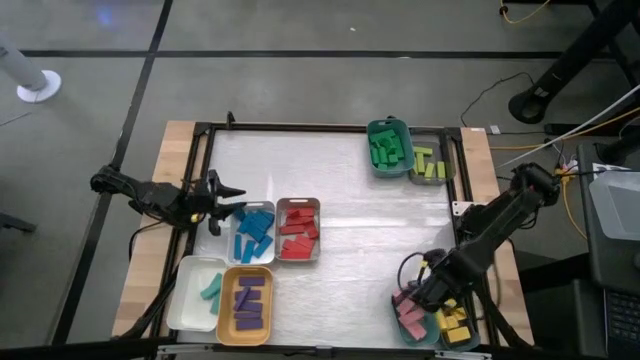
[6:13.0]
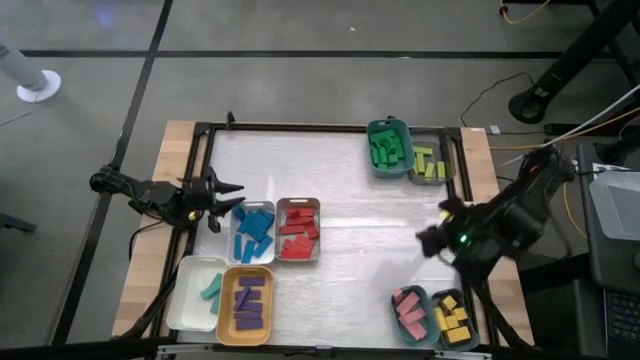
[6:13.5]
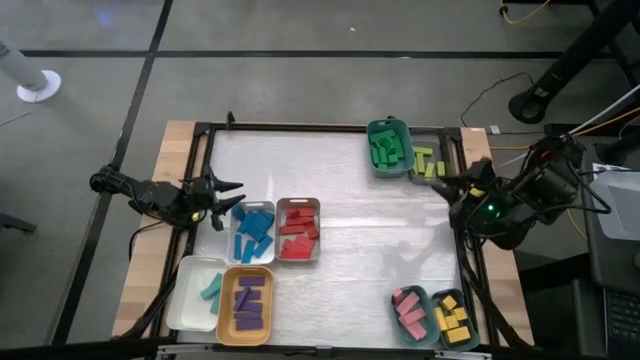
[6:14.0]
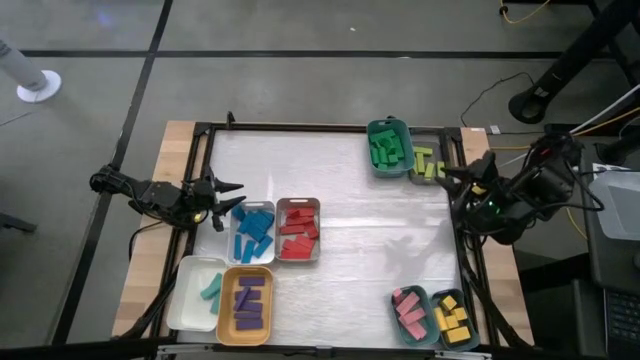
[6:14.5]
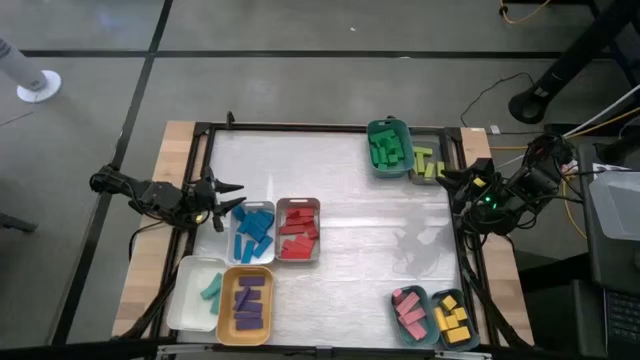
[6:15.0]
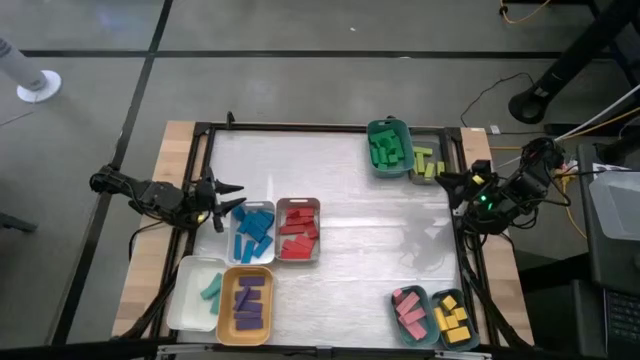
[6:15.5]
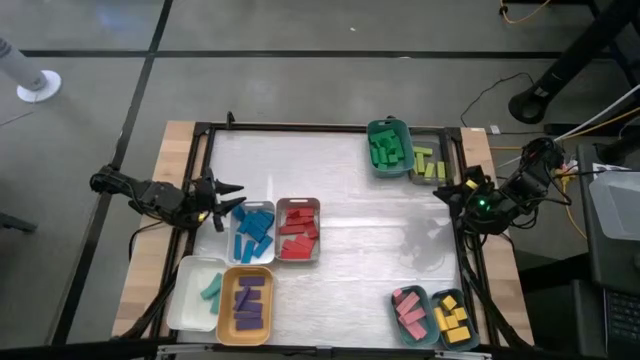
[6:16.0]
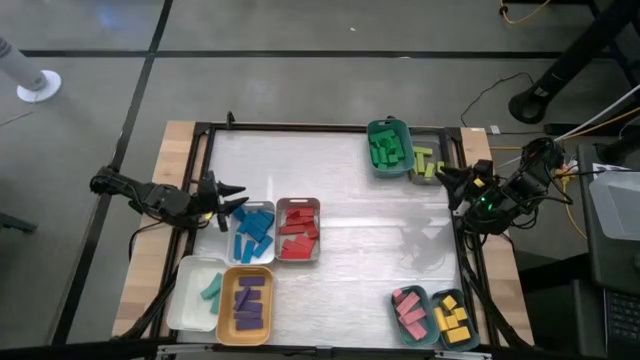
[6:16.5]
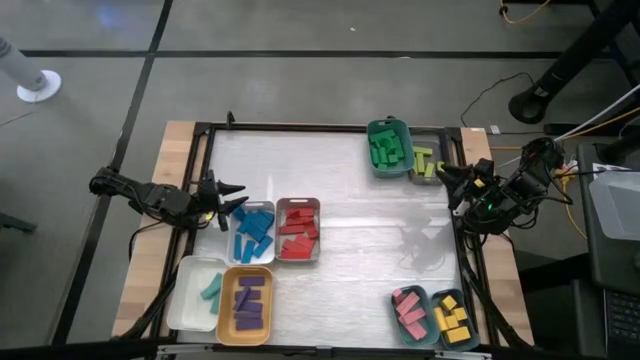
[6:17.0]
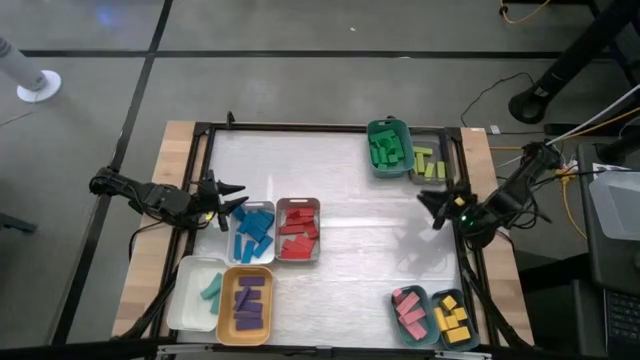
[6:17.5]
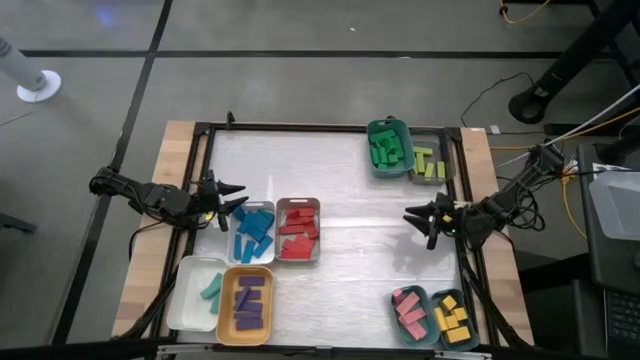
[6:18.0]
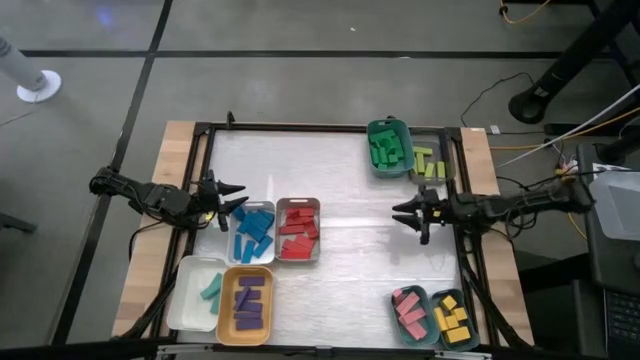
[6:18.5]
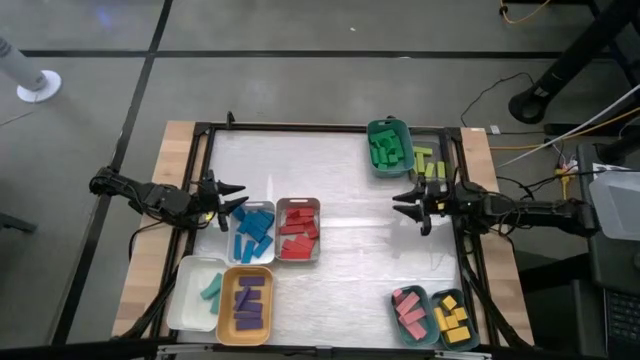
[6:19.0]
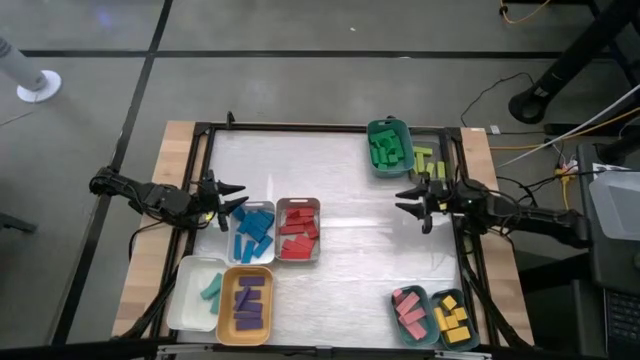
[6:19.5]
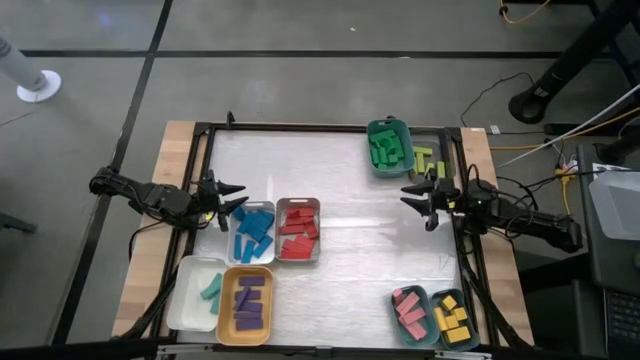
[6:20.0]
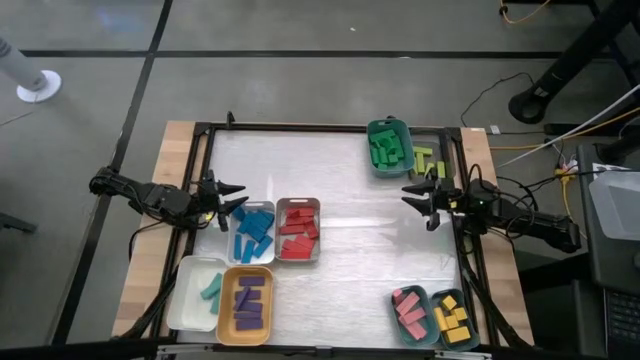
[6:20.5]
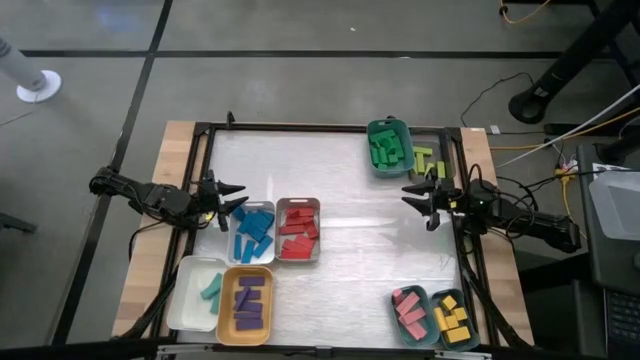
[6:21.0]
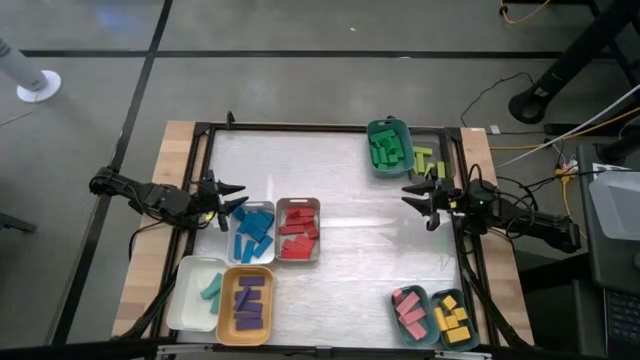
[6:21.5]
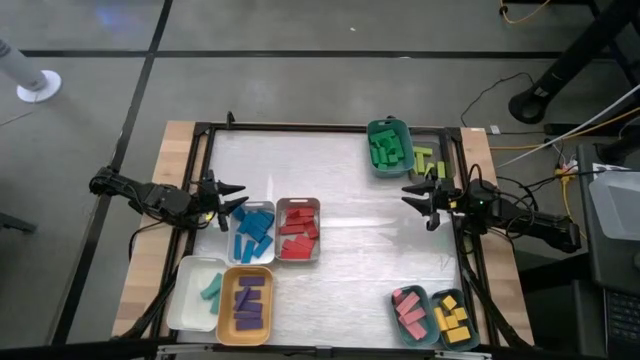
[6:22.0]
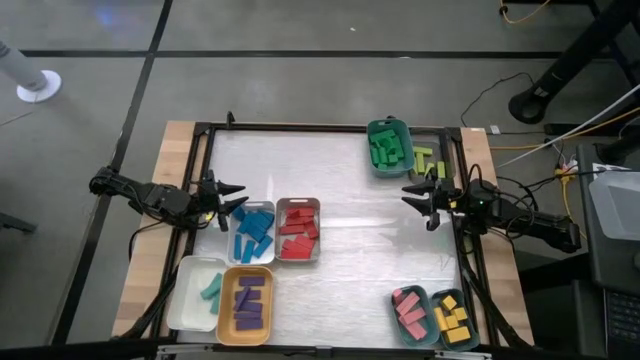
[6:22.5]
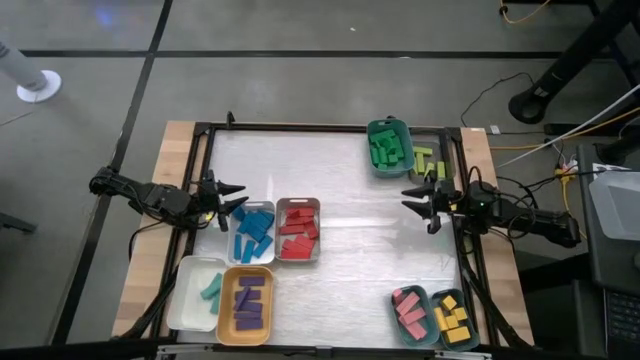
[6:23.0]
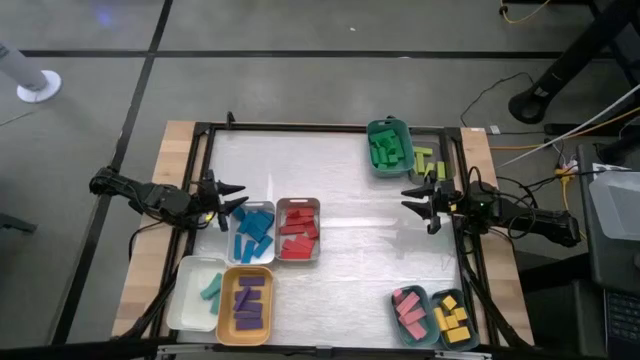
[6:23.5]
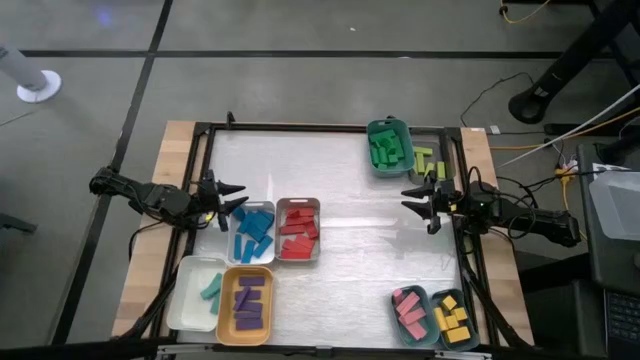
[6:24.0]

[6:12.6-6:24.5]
Task: Sort blocks
Return to Home Position

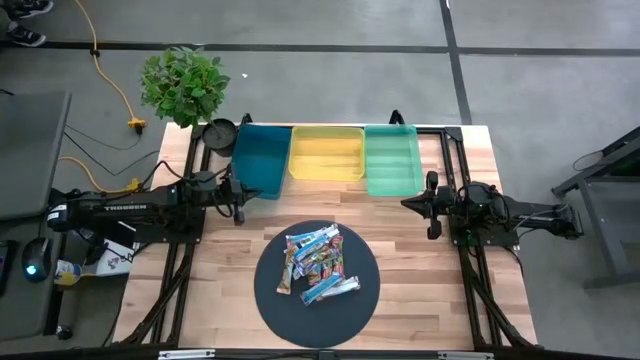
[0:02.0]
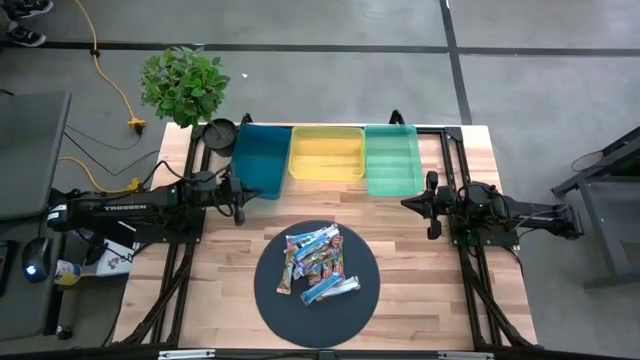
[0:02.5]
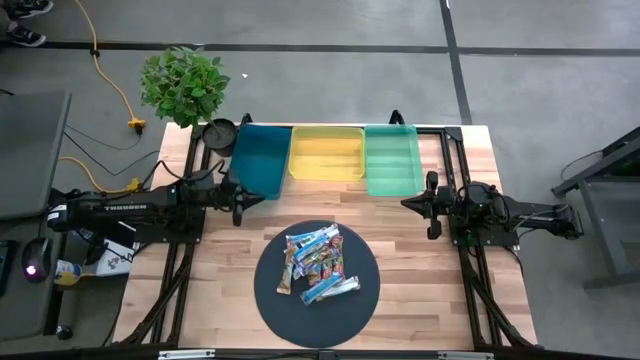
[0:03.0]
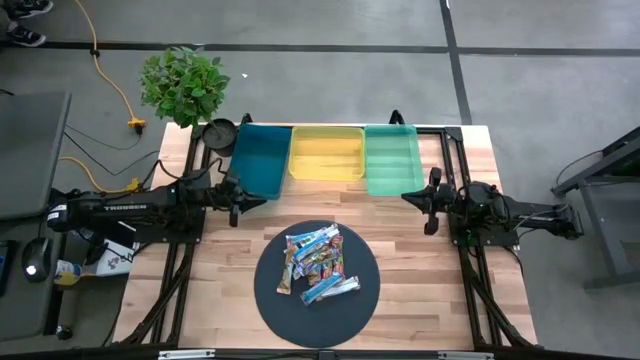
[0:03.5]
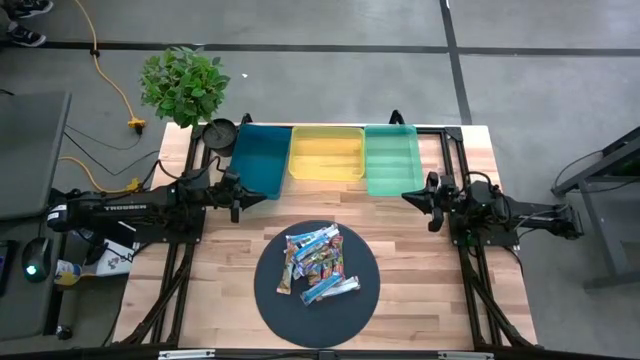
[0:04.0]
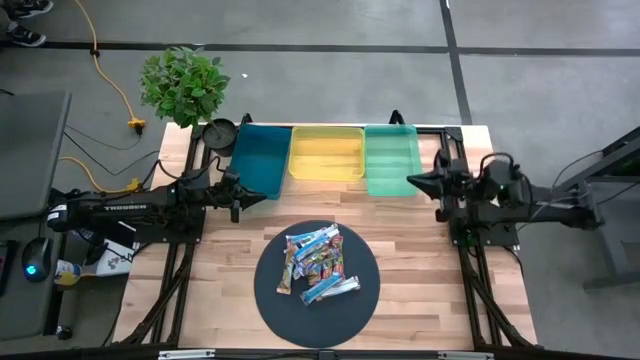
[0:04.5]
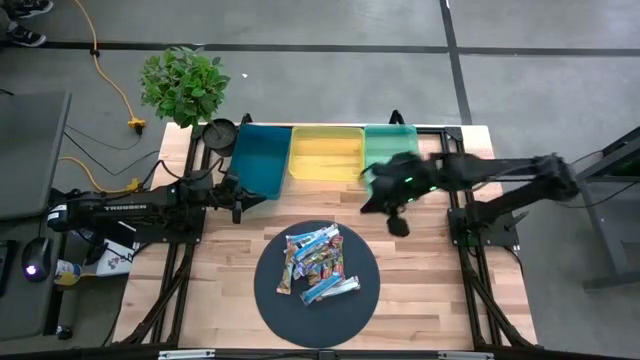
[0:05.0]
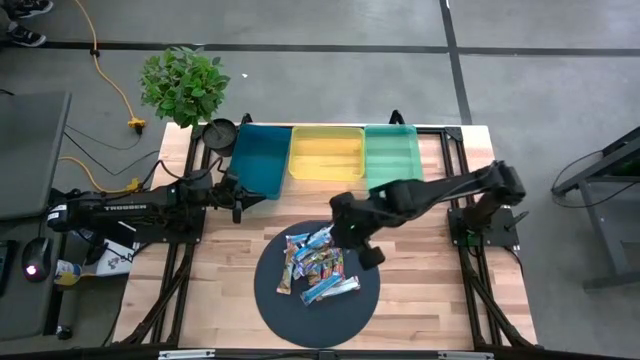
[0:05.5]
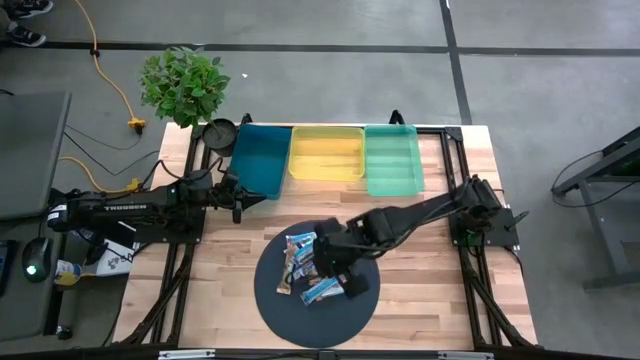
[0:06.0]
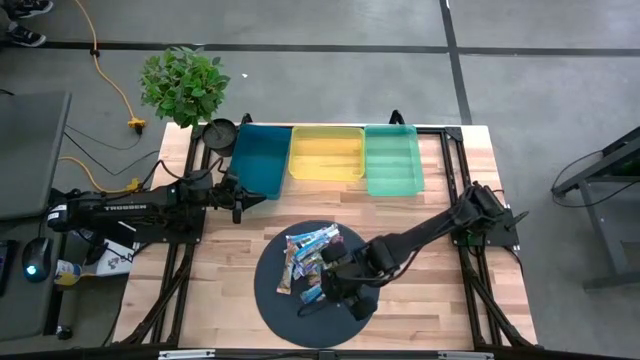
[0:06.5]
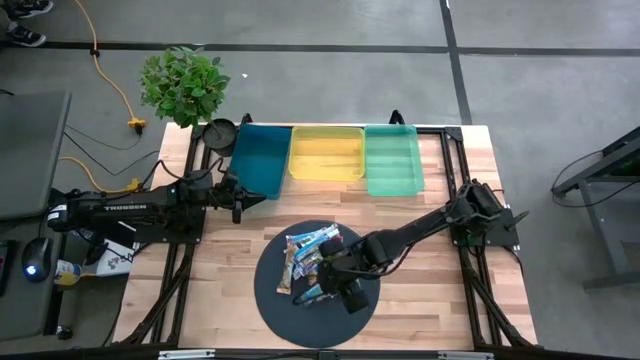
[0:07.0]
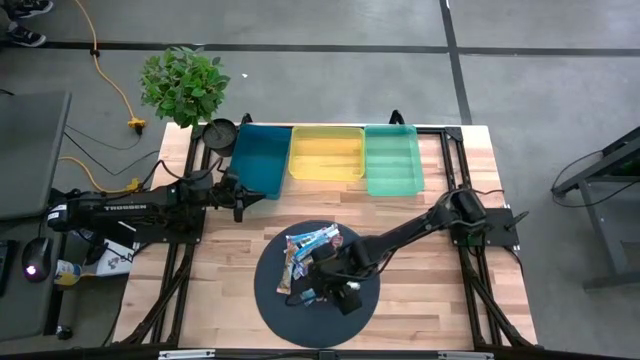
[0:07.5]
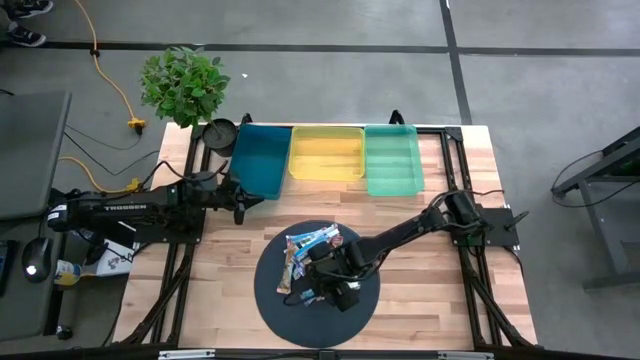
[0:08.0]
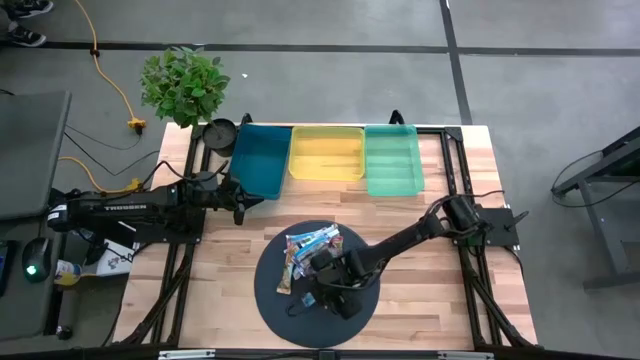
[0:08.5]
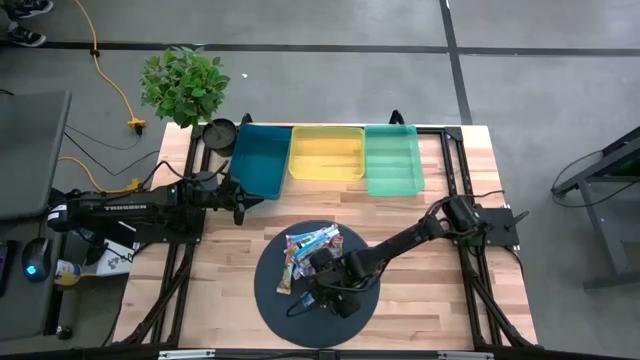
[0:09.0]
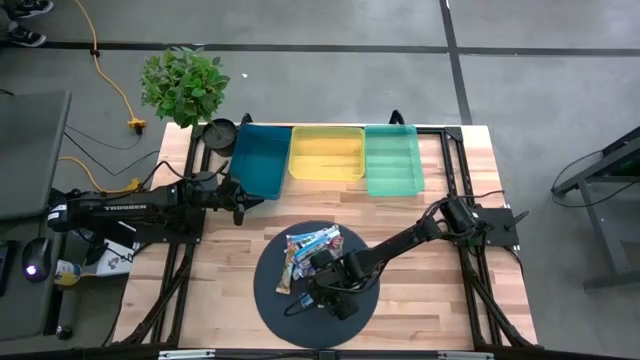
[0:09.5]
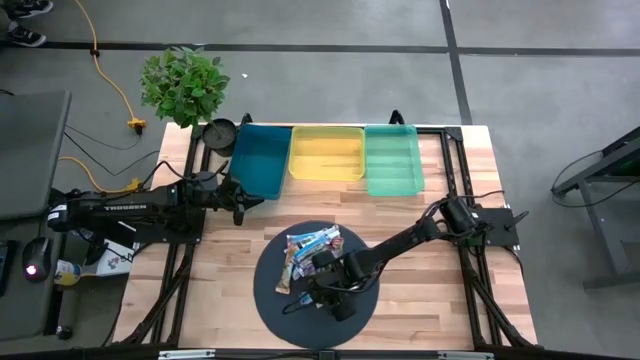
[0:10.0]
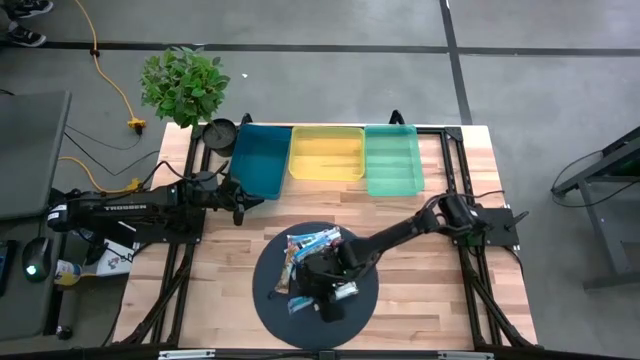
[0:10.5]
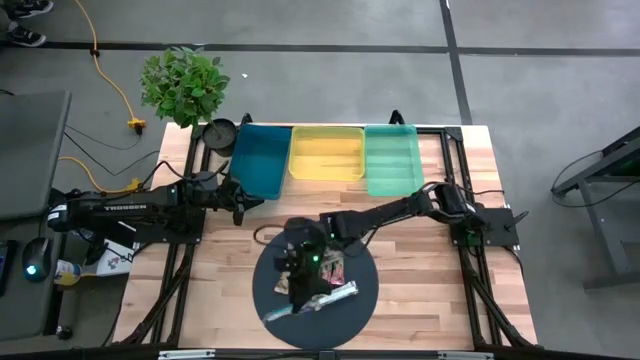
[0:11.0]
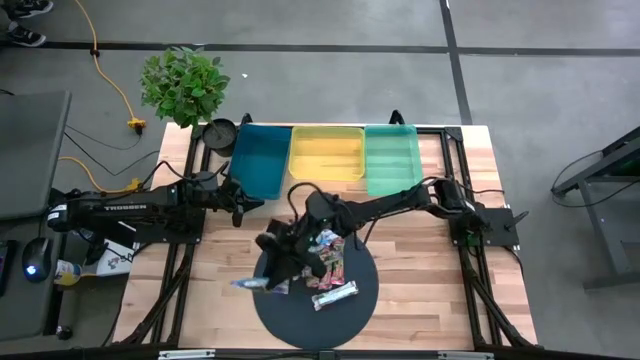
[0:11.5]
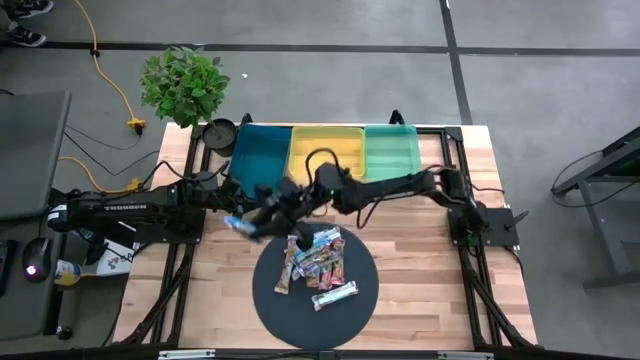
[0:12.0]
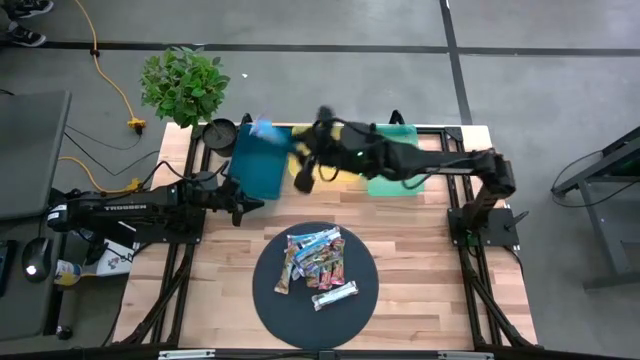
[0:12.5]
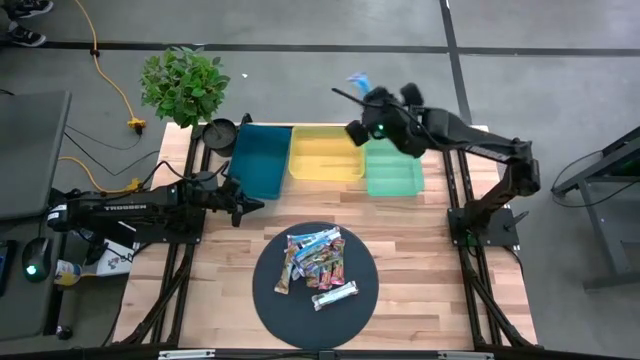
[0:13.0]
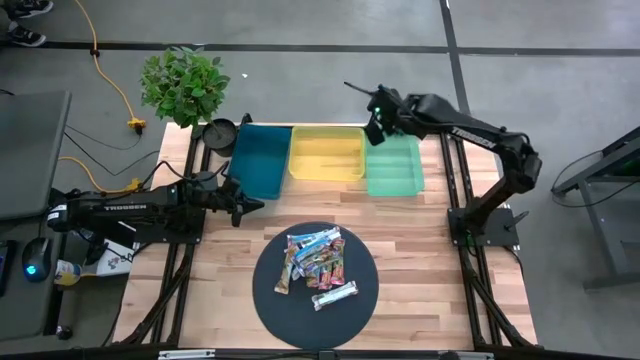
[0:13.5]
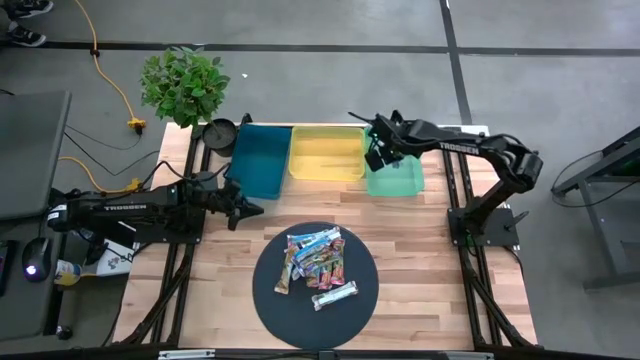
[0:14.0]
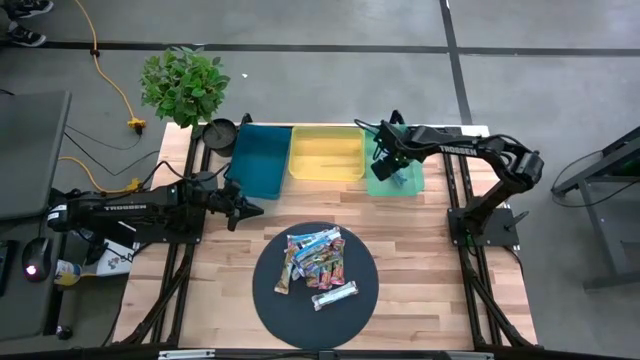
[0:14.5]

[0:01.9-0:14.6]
Task: Pick and place Granola Bars by type
Put the blue granola bar into the green bin
